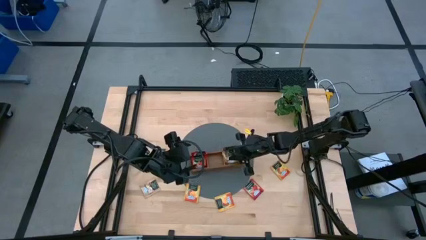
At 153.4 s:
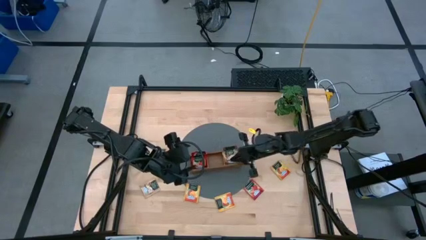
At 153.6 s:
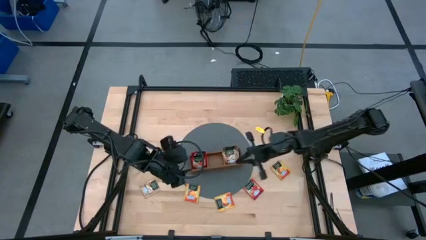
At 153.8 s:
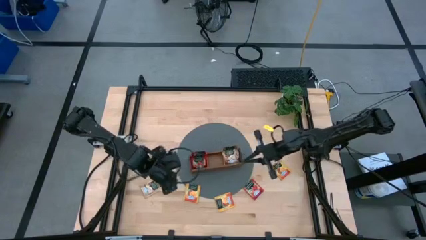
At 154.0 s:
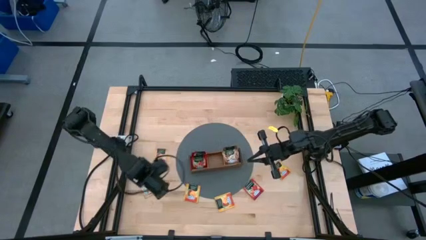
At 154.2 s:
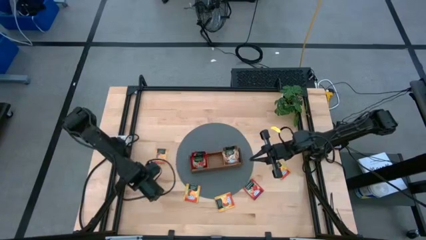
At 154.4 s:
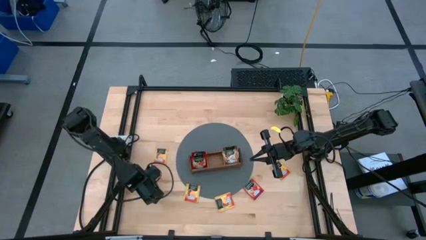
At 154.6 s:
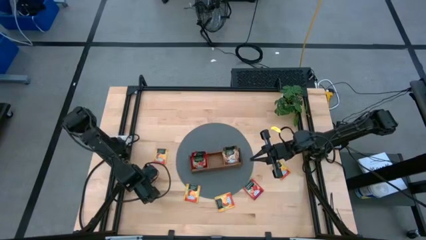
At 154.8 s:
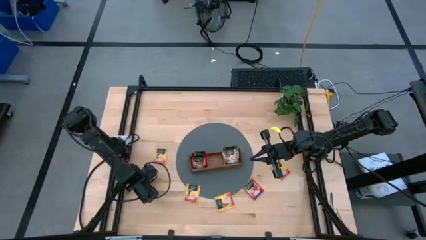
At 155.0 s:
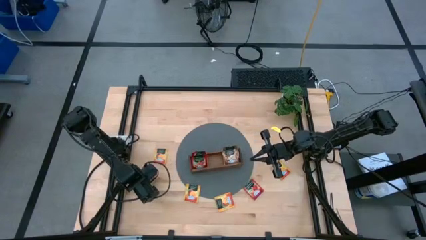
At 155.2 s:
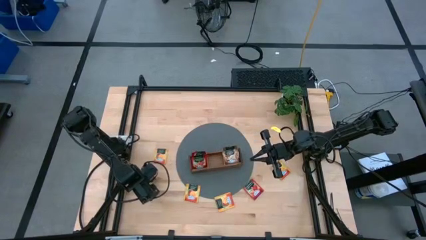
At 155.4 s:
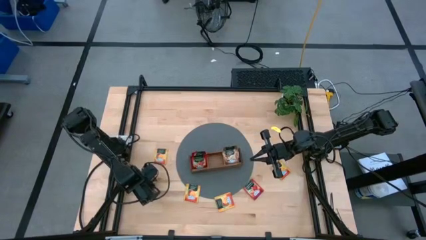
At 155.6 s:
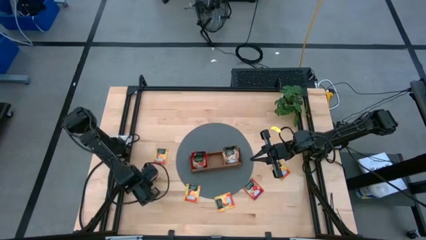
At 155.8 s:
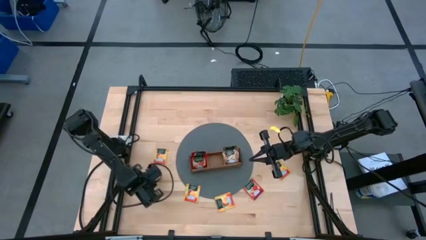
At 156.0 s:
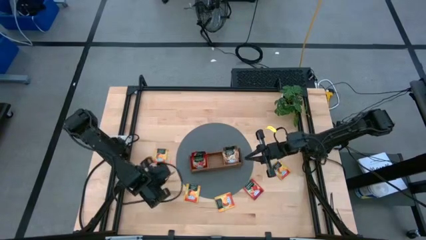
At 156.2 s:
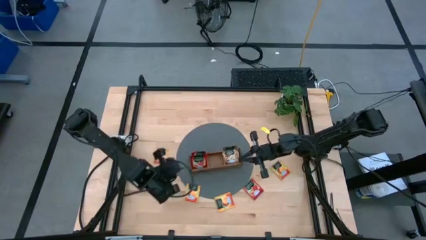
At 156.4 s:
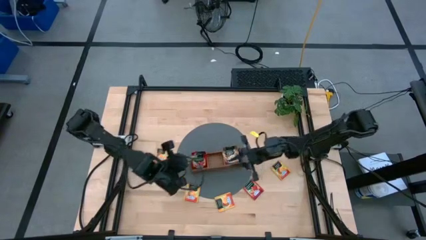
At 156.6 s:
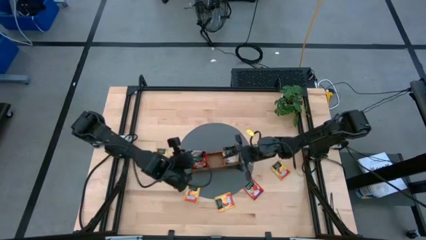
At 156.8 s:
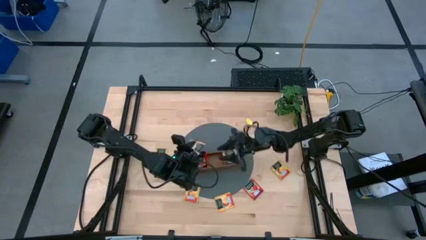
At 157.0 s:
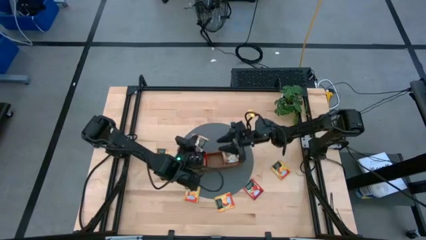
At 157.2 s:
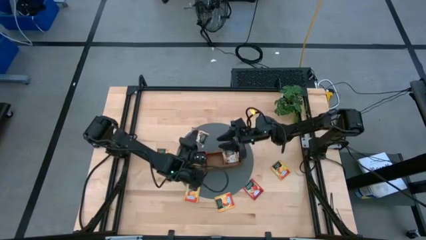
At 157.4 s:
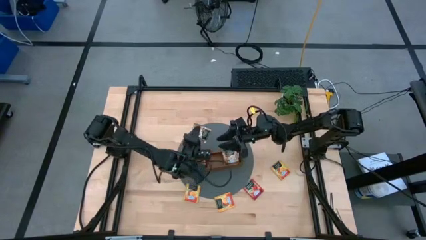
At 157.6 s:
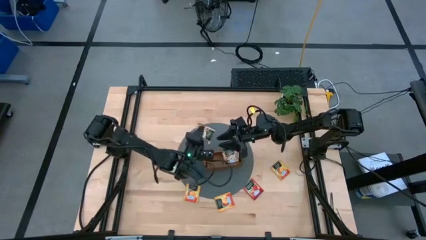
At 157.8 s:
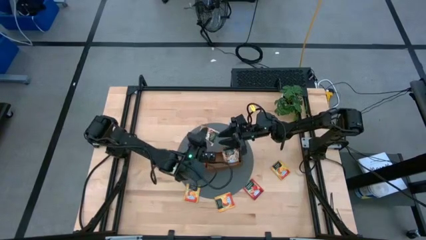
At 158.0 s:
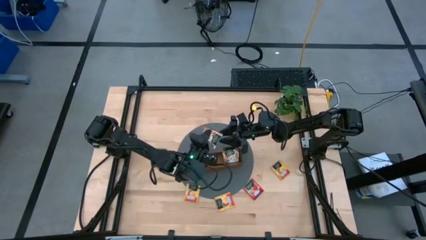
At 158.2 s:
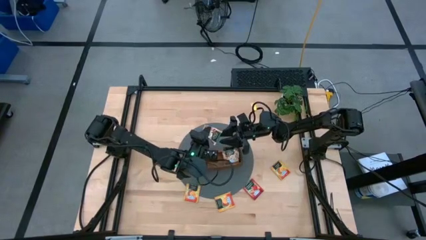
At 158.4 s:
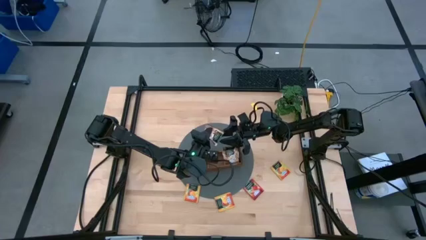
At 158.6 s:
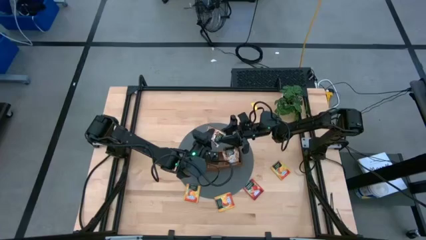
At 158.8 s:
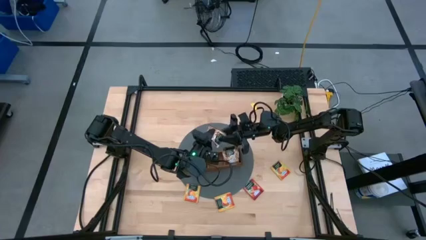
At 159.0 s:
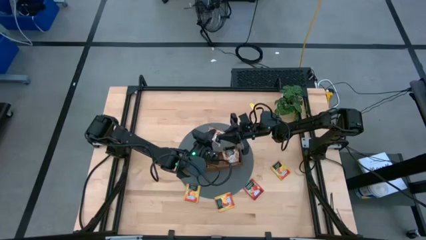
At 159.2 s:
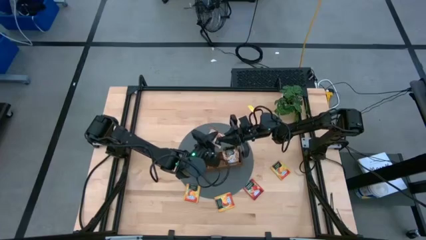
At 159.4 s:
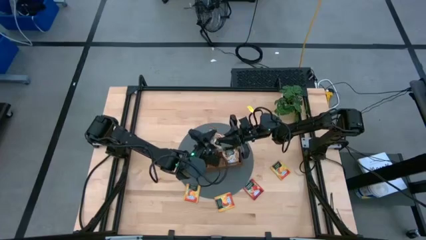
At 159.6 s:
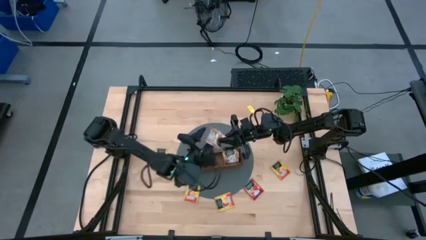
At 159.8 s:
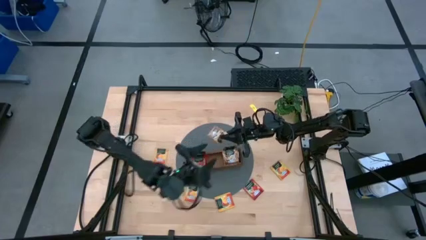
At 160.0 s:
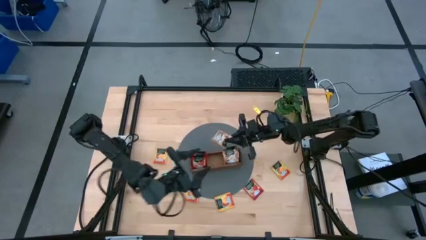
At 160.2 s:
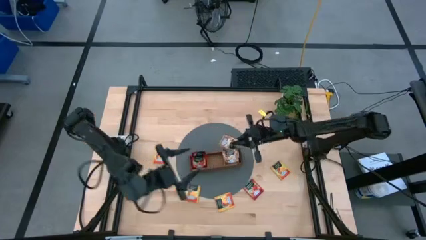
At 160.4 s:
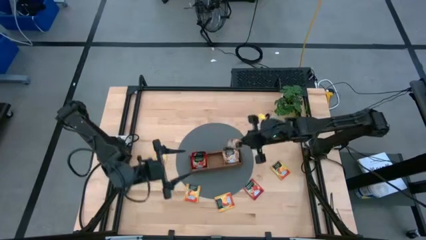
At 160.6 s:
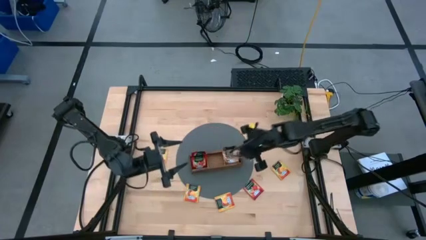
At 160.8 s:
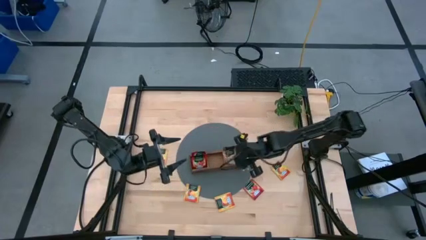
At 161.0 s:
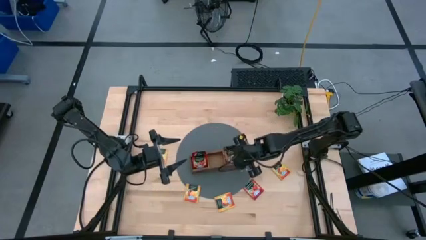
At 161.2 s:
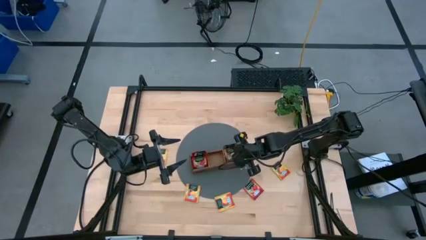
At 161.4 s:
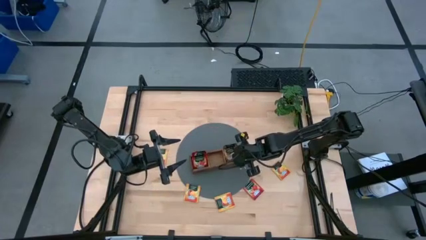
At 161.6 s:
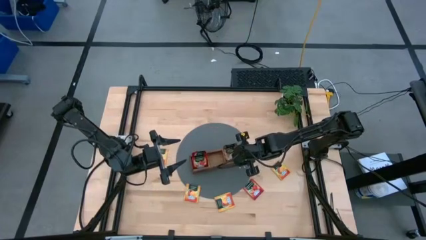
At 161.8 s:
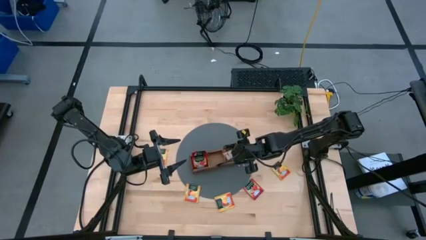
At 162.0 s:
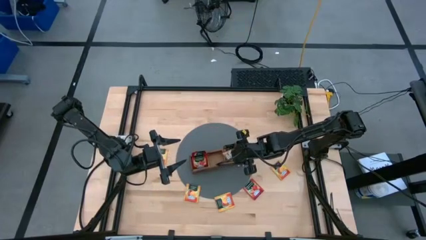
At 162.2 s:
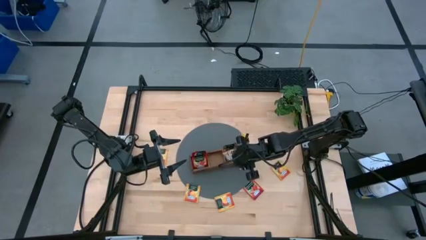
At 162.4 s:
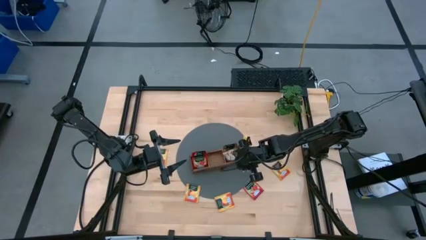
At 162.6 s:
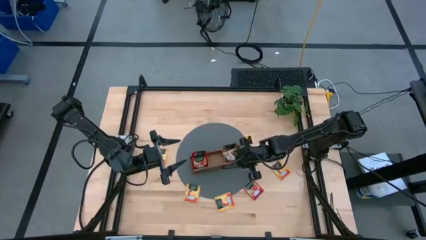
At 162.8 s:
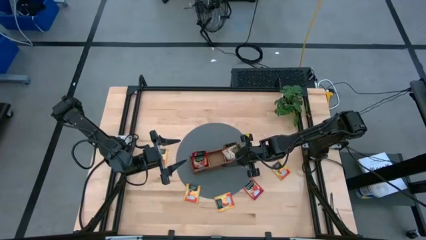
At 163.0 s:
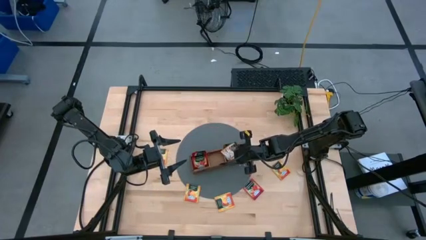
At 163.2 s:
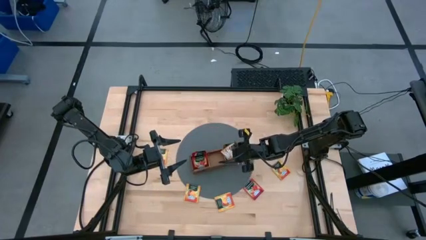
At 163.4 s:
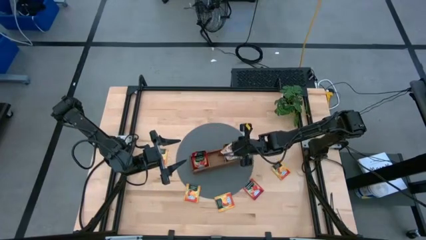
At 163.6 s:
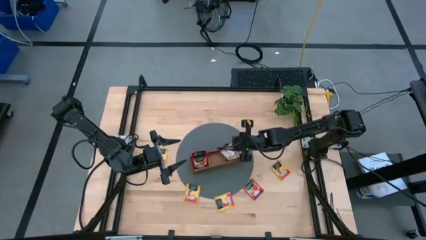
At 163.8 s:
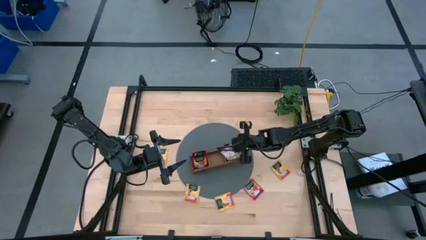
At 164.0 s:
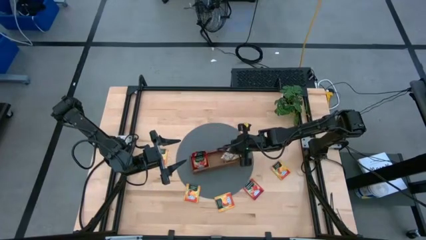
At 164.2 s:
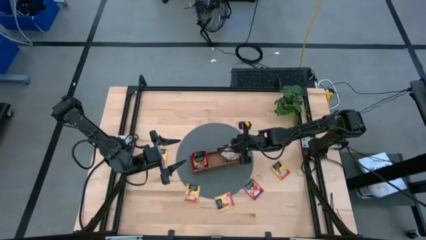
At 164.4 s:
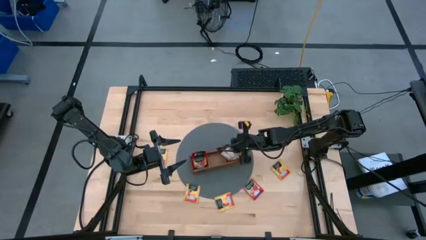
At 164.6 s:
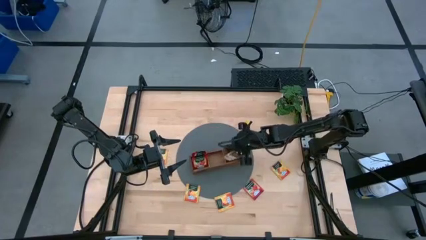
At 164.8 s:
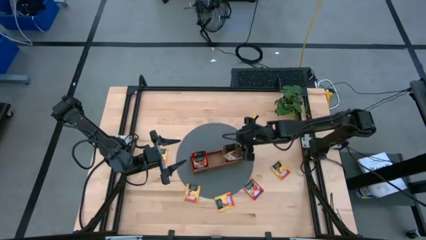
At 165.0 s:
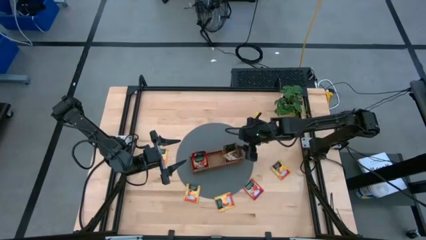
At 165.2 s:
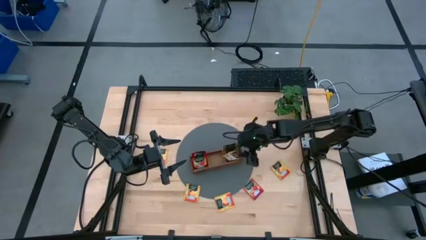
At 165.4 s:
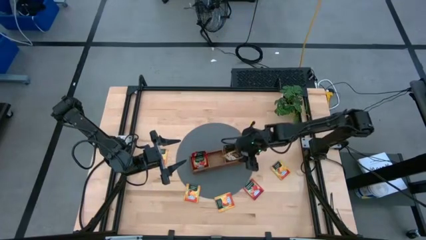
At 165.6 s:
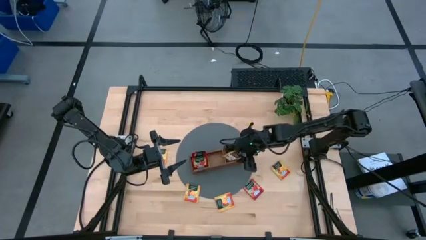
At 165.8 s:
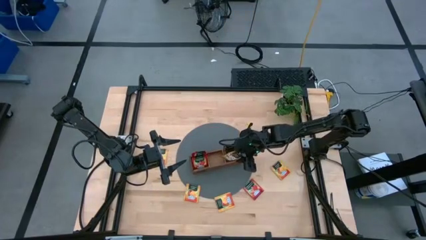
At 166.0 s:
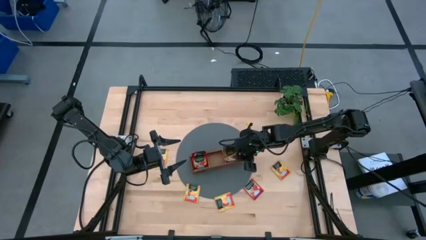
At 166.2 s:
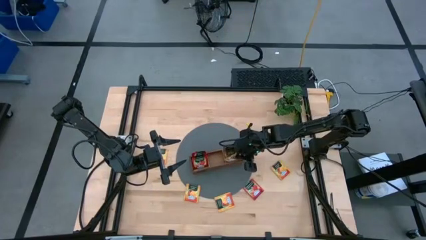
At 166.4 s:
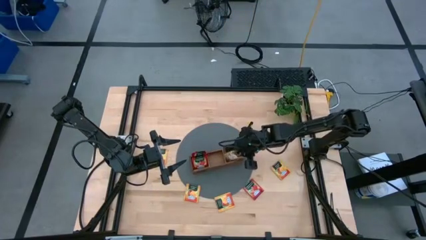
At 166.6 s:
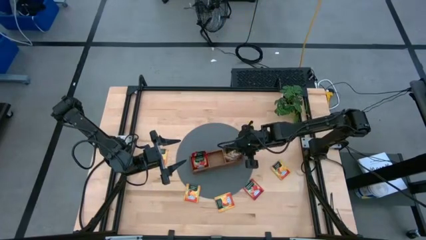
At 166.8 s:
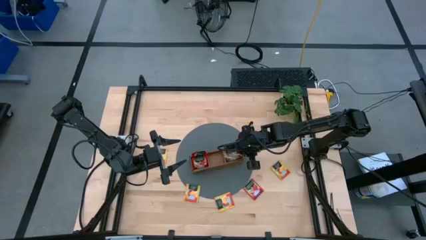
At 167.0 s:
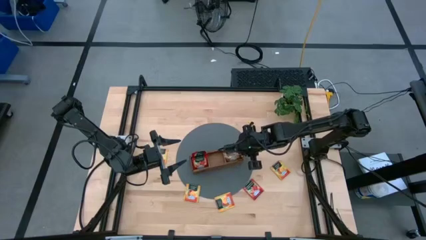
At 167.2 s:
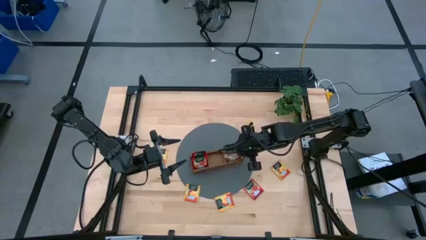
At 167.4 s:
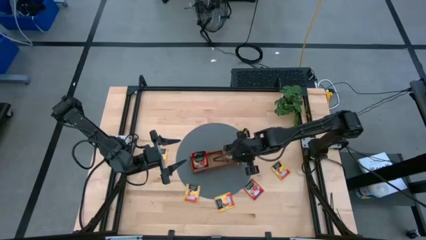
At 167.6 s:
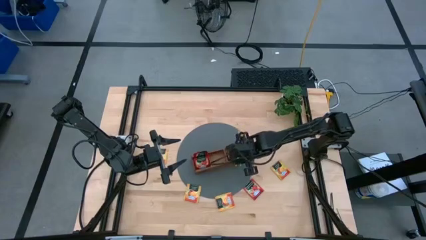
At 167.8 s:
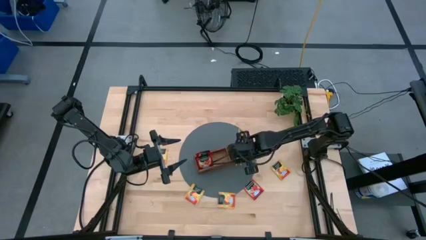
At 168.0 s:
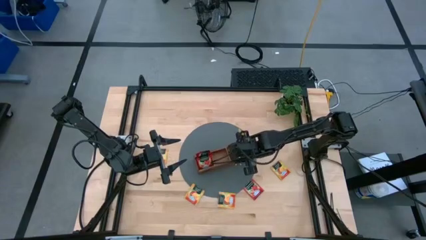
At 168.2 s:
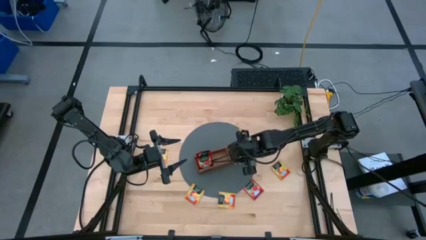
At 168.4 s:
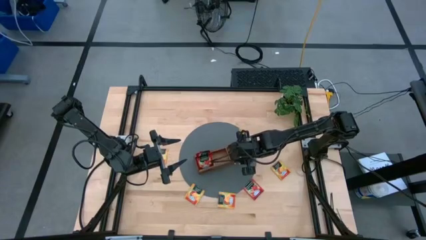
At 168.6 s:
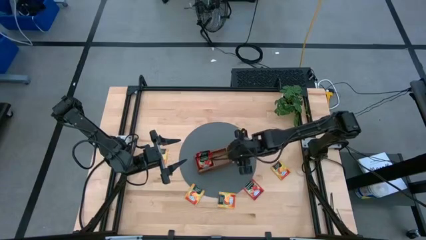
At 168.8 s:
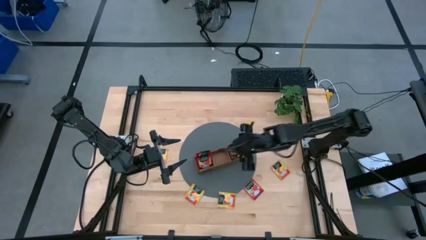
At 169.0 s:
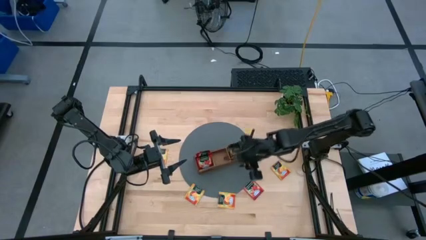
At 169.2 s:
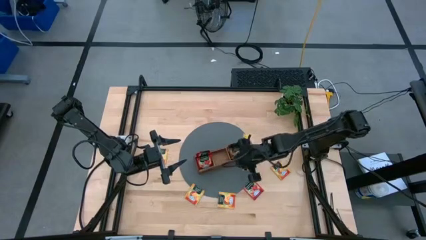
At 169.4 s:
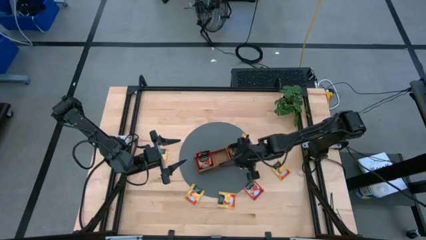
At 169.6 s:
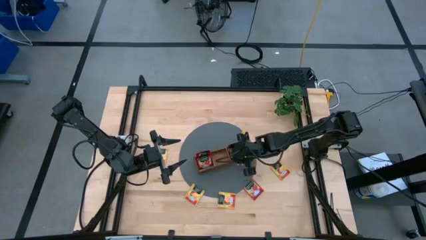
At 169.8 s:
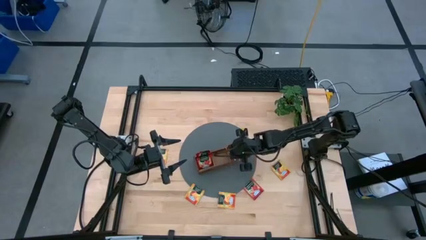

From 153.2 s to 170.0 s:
Task: Pick & Place Tea
Put the yellow tea bag into the right section of the wooden organizer

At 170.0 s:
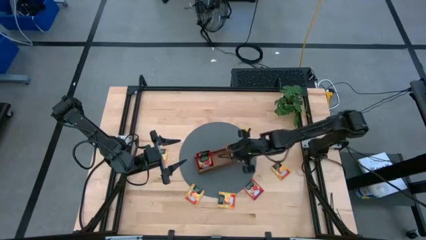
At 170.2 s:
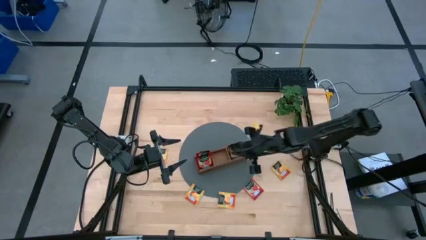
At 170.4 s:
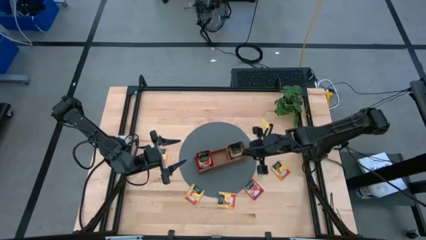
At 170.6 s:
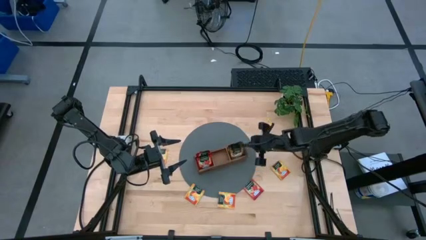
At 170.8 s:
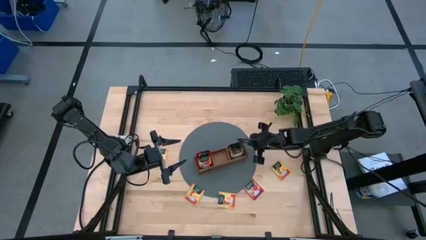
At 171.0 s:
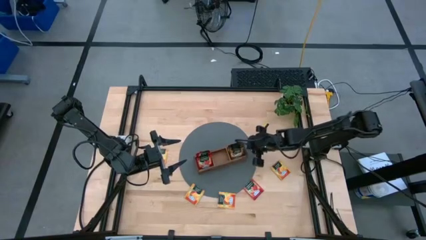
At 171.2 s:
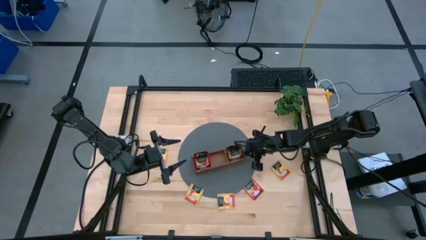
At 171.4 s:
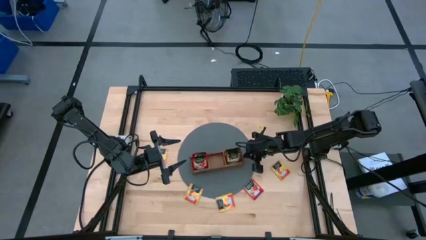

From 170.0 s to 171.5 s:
Adjust the wooden organizer
